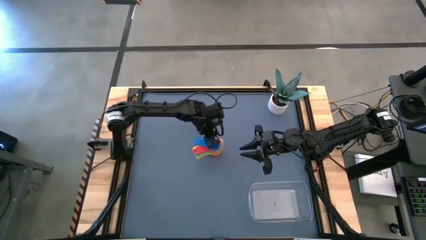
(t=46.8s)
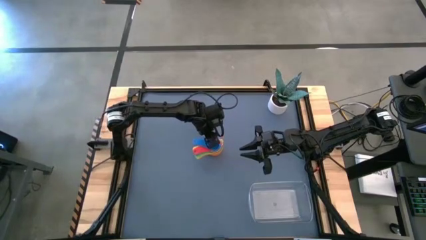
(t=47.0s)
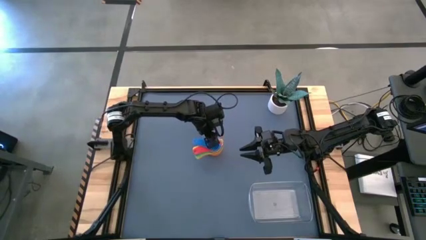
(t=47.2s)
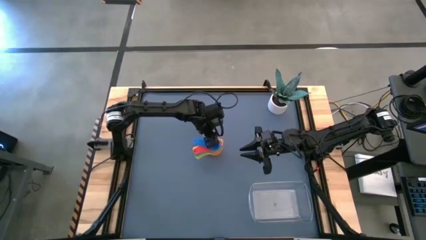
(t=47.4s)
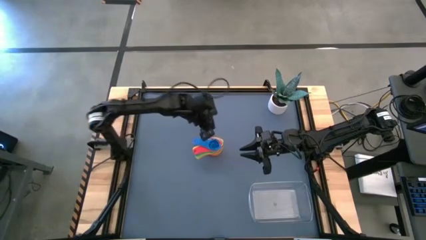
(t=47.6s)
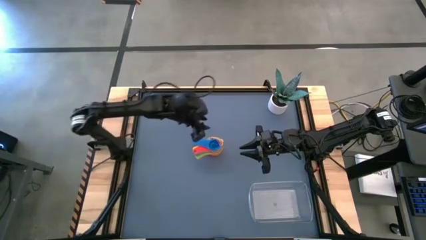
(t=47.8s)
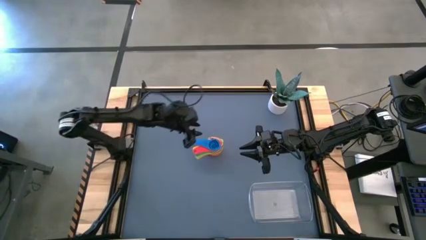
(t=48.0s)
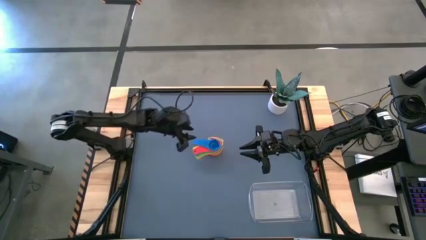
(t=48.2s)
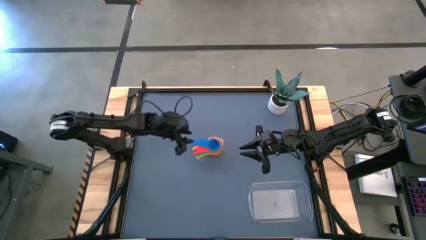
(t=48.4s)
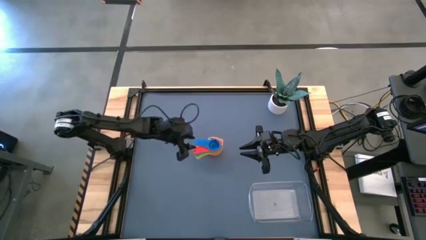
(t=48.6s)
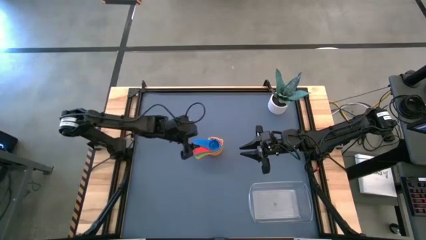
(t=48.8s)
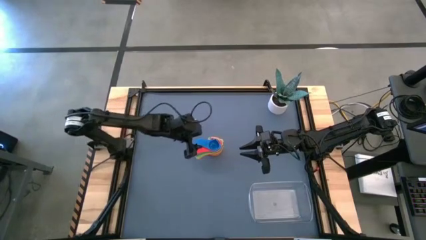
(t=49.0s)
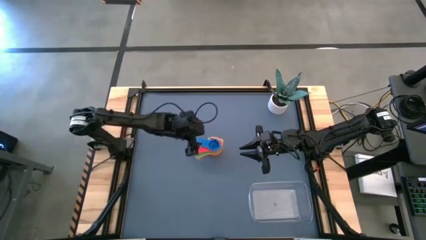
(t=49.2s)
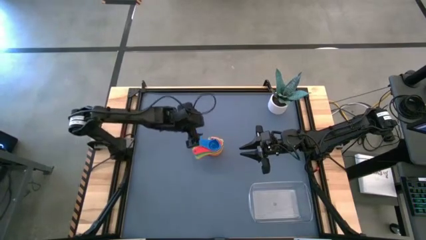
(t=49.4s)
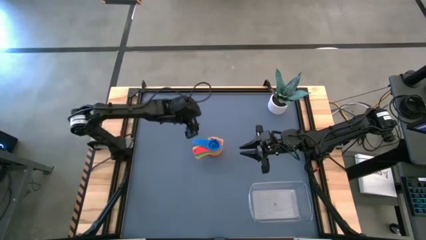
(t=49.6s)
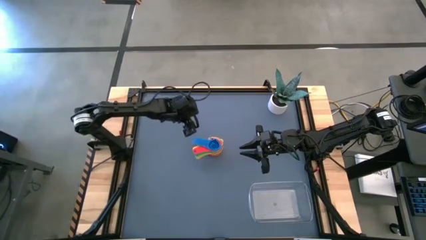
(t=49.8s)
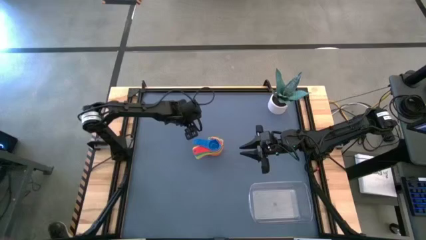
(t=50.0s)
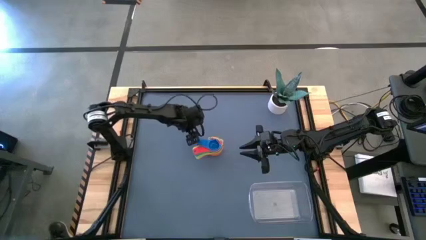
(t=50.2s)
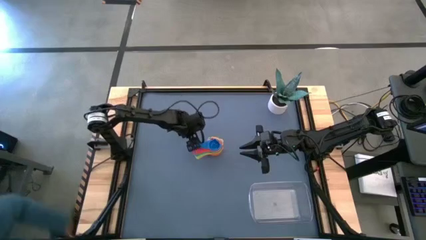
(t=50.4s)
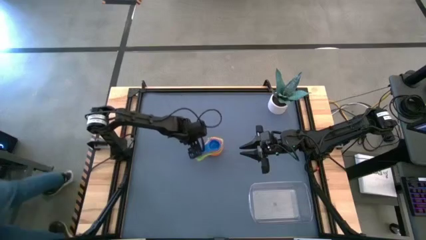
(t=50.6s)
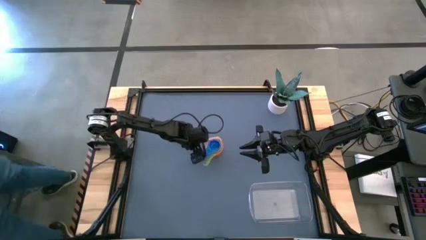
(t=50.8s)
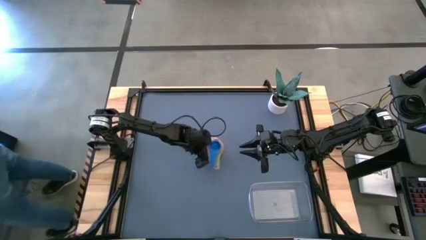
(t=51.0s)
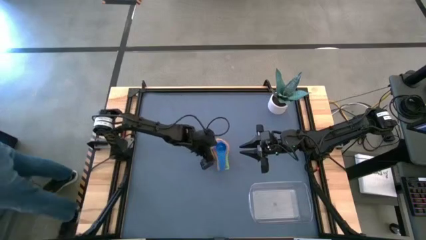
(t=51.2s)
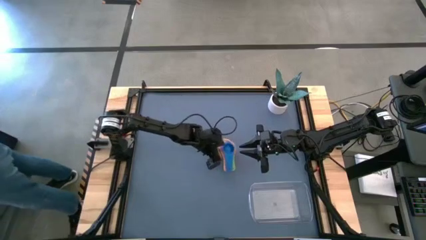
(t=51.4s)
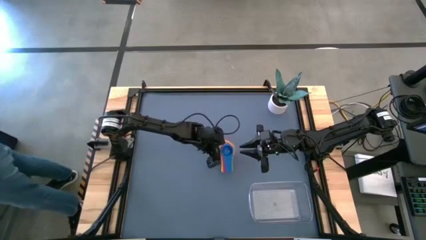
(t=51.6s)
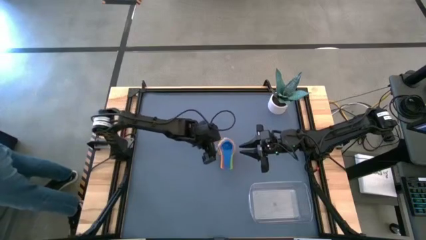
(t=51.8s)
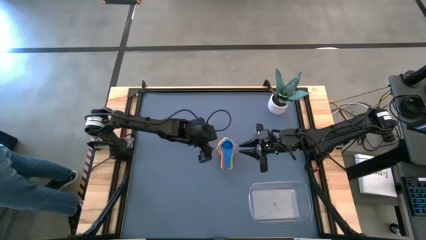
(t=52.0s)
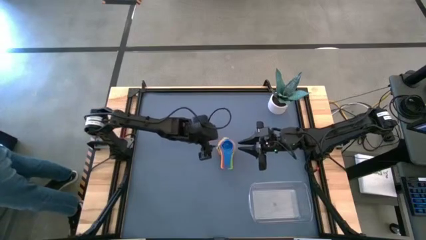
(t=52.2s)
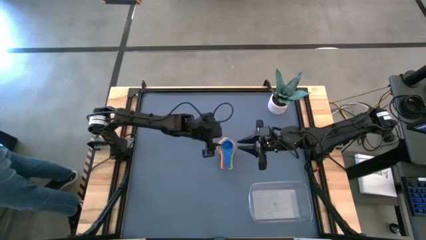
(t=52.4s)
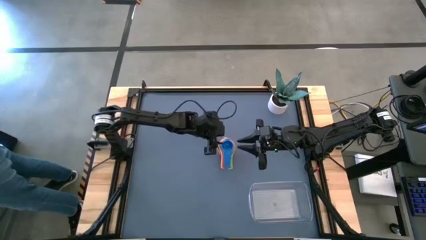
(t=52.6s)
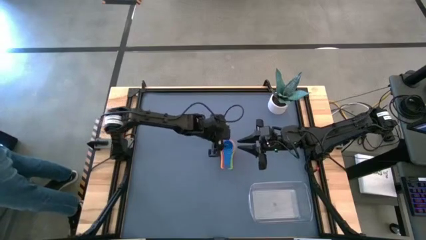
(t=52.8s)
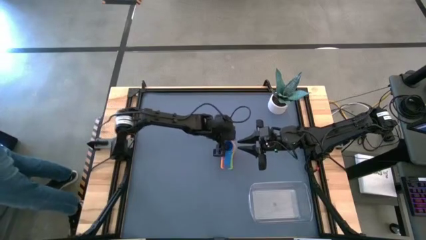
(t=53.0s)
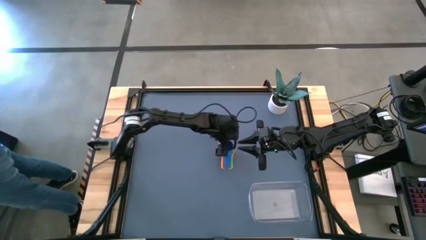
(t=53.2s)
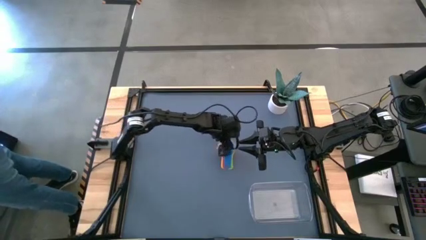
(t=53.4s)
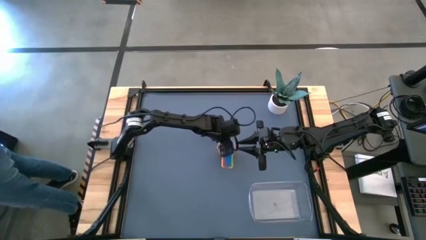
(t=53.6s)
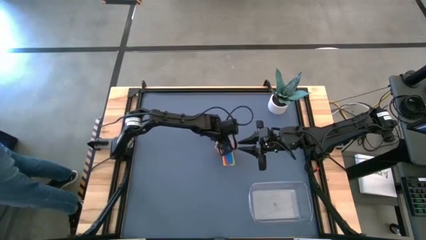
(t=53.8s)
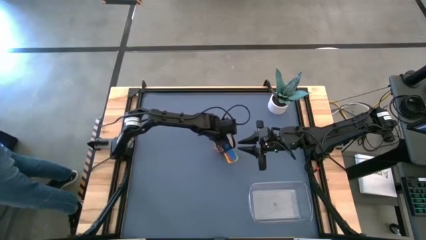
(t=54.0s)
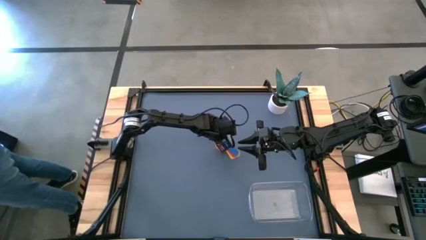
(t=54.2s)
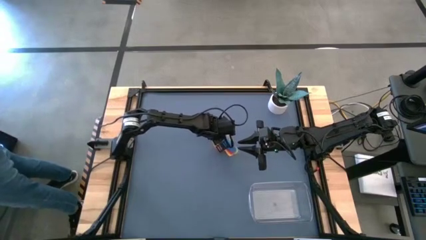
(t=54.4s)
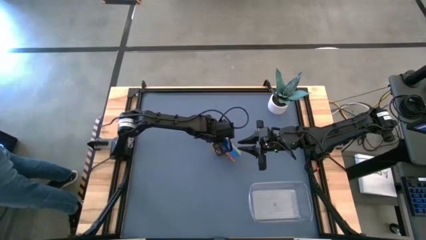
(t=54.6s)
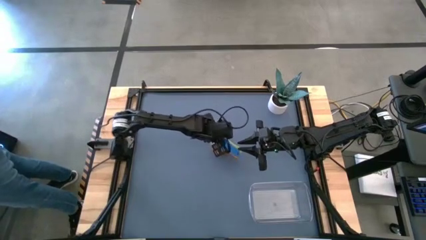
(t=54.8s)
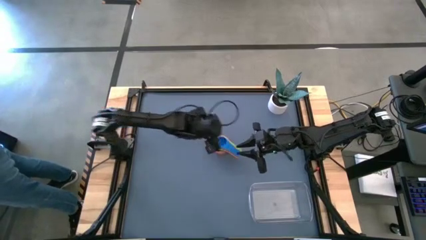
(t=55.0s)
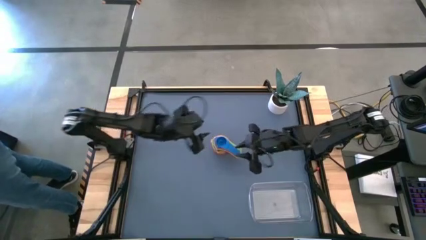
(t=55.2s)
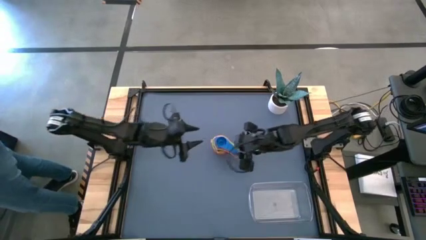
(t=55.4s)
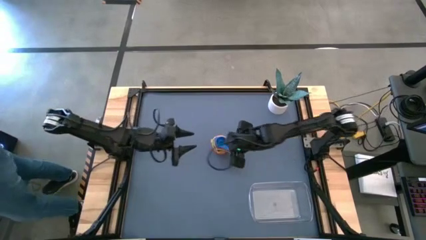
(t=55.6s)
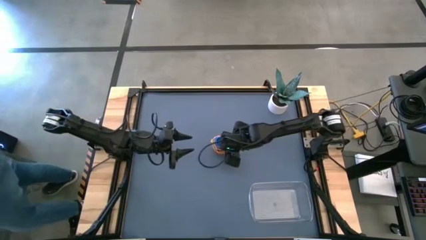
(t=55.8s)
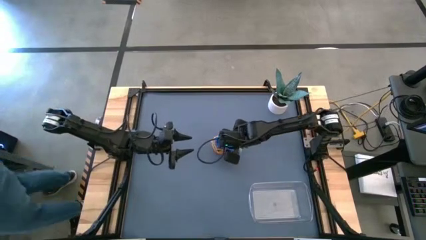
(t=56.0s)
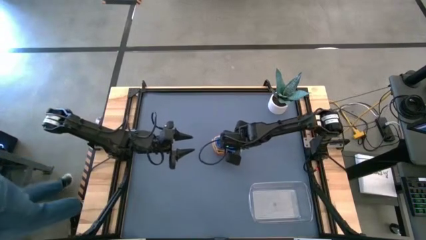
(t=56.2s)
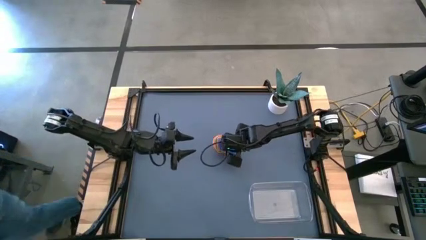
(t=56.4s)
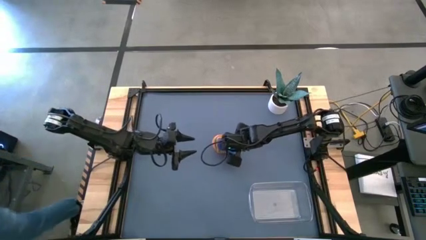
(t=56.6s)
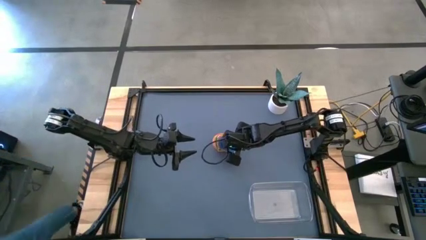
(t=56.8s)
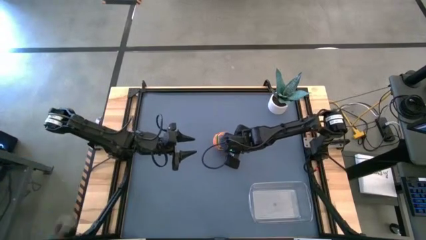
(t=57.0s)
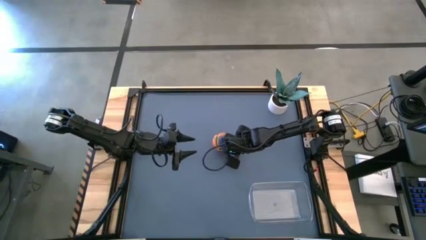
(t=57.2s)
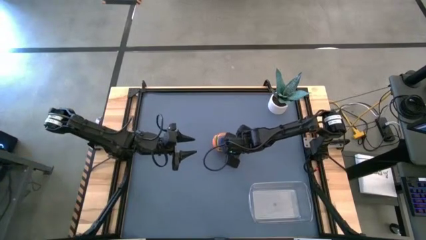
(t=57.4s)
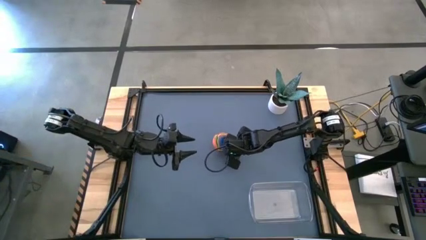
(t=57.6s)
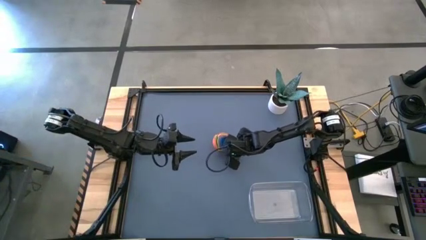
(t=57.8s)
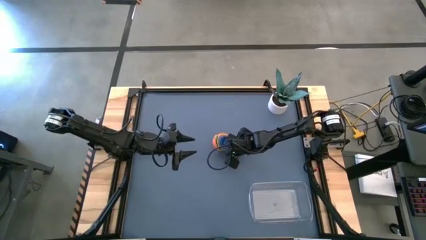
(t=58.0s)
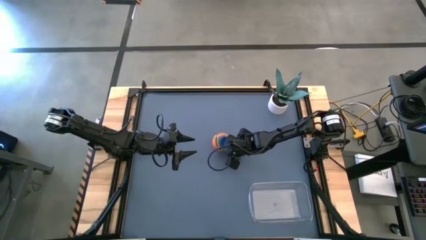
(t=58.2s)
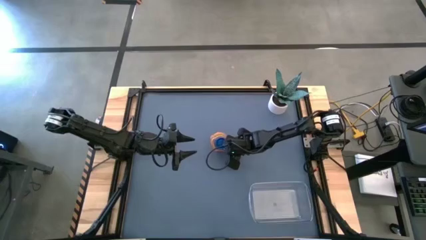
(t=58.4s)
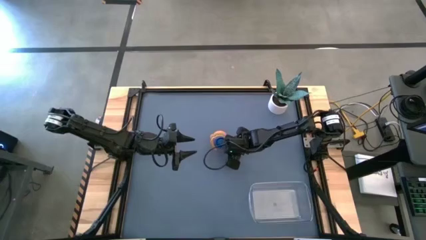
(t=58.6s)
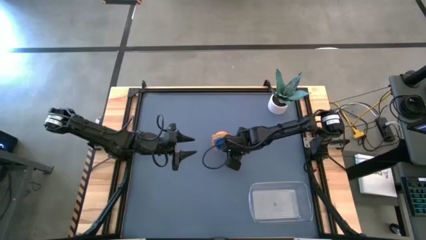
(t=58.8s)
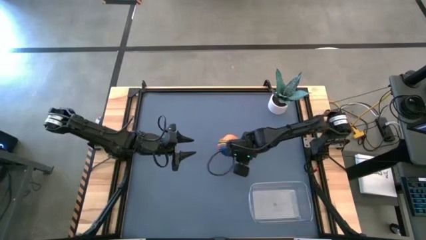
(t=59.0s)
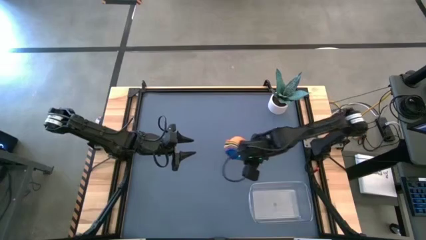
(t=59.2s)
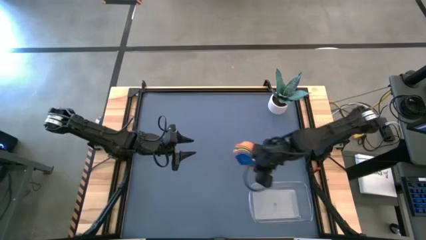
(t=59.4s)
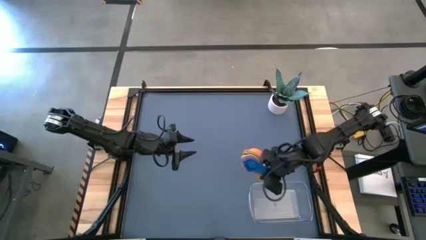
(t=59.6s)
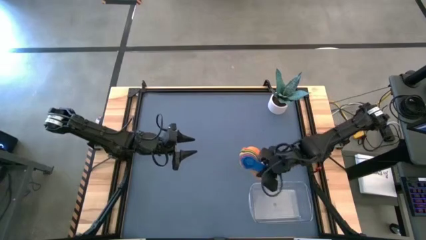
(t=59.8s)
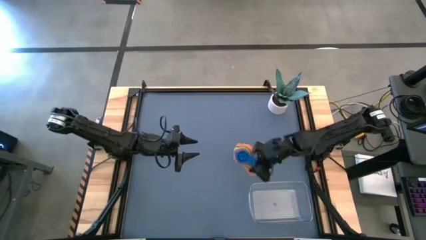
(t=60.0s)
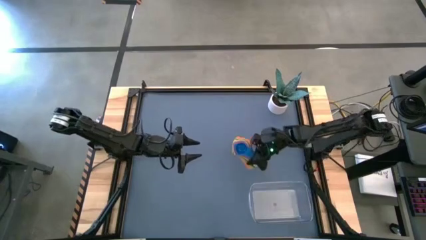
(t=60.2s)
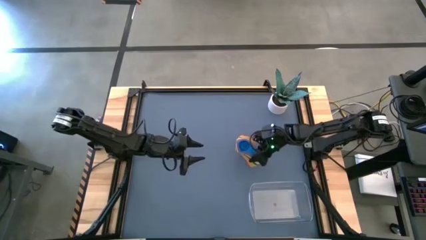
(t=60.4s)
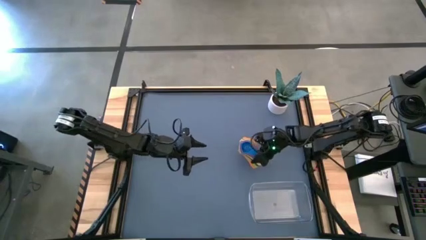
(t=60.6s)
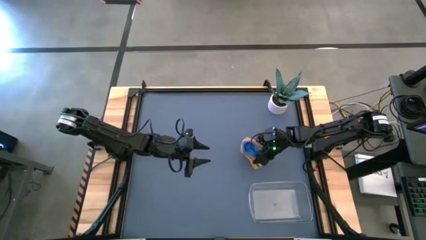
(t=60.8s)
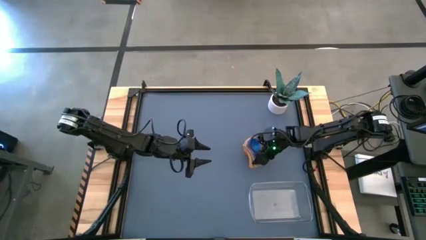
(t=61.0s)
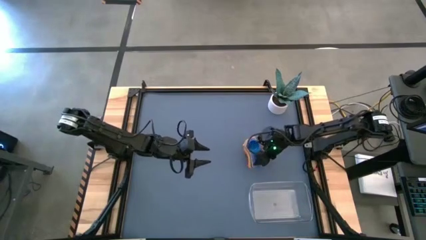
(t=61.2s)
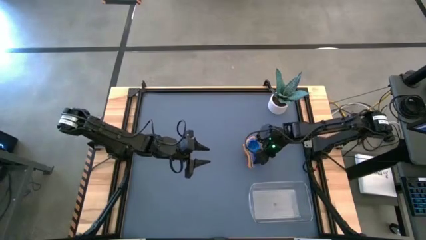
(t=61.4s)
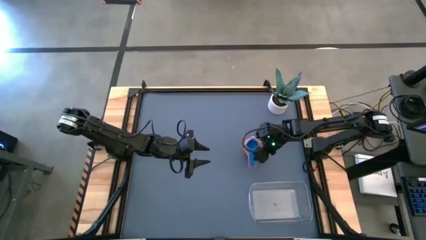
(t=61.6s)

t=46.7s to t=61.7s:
Task: Nest measuring cups in basket
Put the stacked measuring cups into the bin
